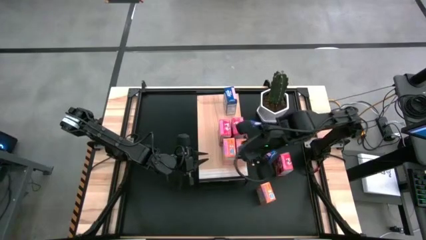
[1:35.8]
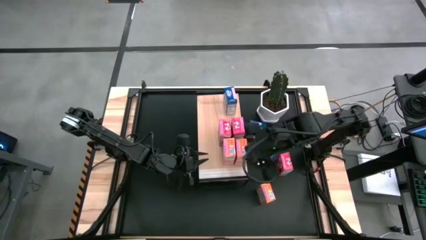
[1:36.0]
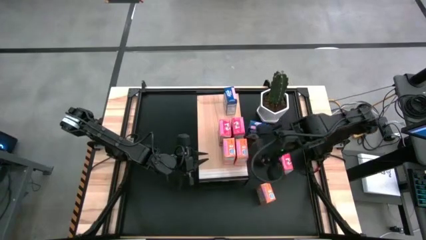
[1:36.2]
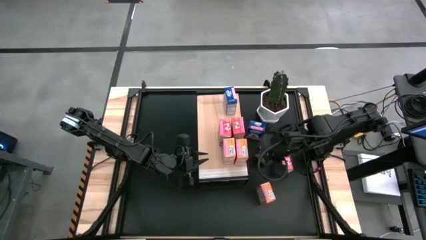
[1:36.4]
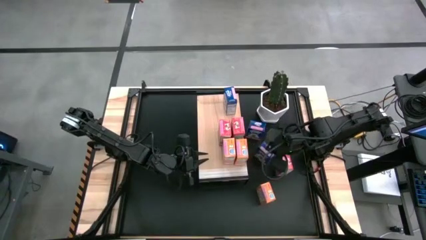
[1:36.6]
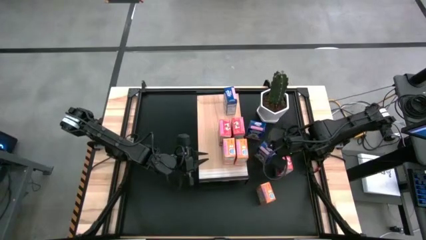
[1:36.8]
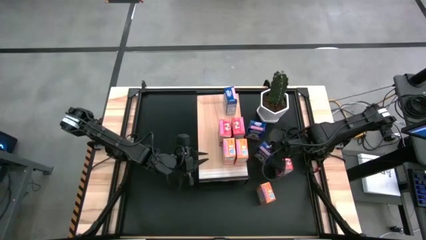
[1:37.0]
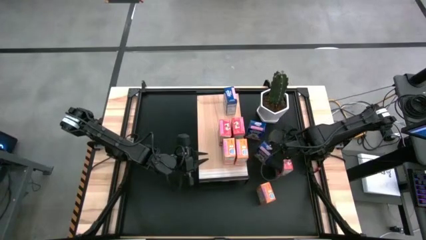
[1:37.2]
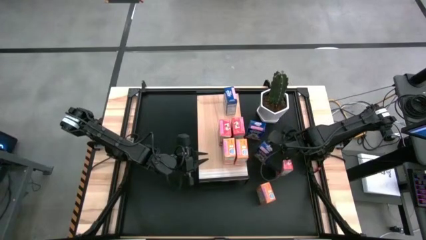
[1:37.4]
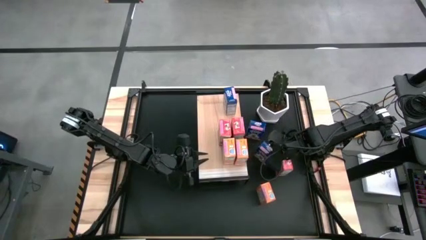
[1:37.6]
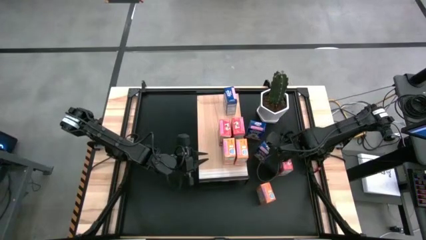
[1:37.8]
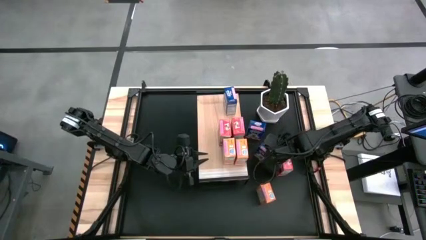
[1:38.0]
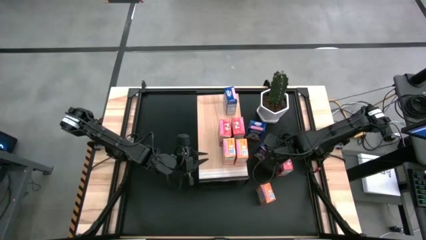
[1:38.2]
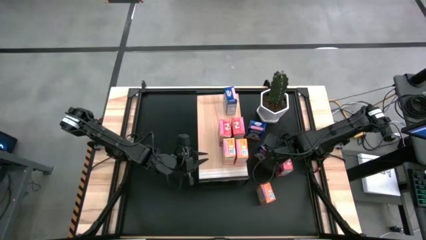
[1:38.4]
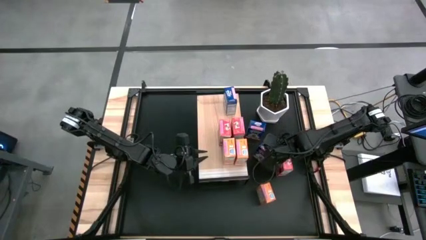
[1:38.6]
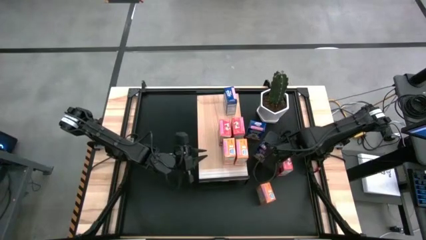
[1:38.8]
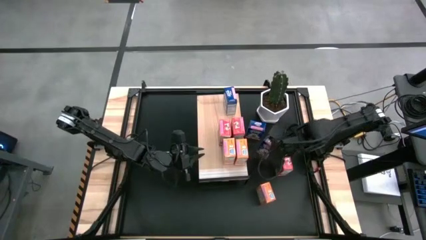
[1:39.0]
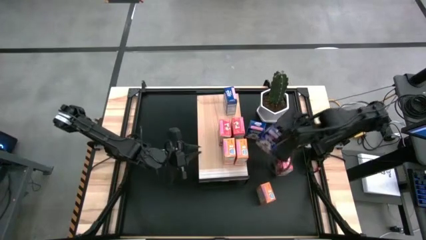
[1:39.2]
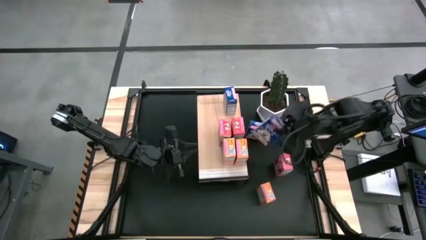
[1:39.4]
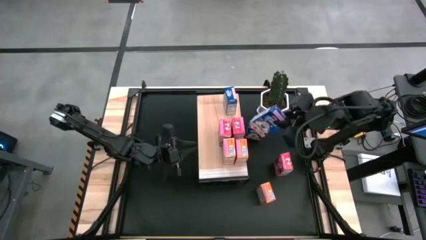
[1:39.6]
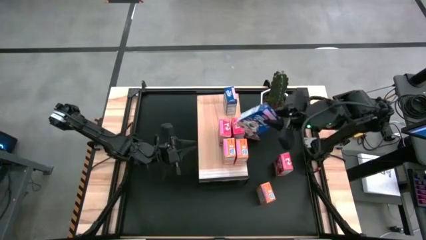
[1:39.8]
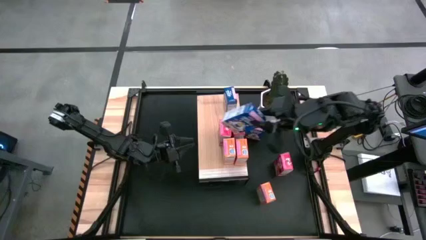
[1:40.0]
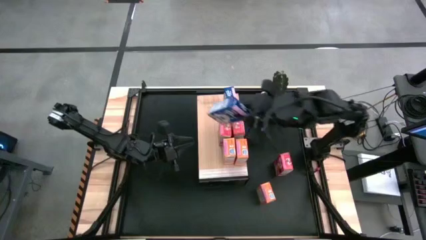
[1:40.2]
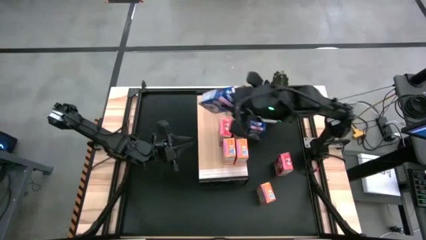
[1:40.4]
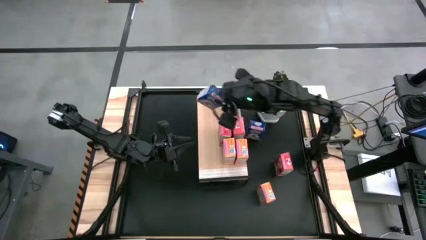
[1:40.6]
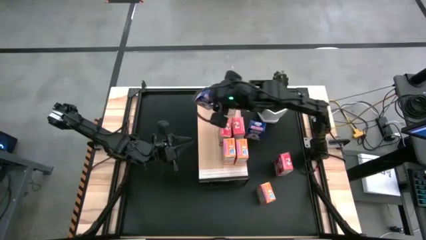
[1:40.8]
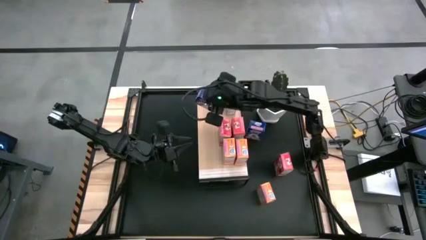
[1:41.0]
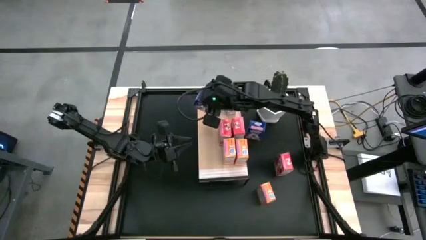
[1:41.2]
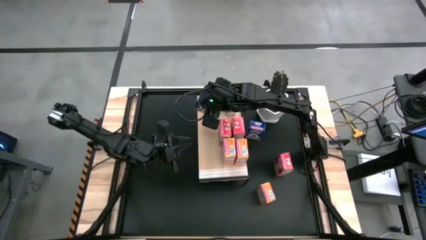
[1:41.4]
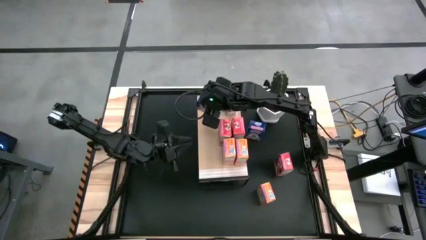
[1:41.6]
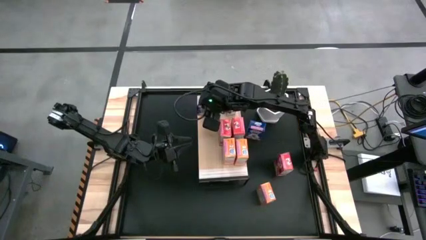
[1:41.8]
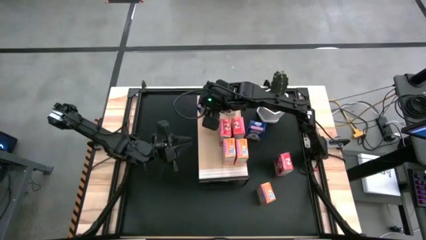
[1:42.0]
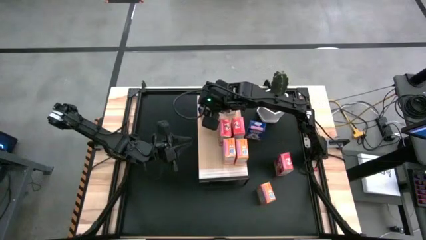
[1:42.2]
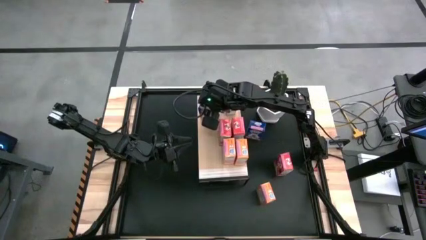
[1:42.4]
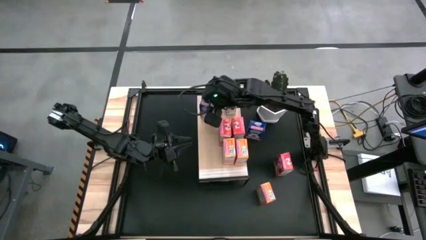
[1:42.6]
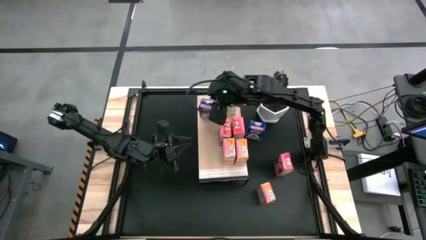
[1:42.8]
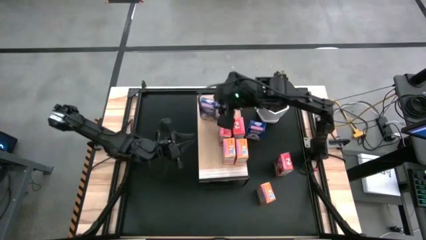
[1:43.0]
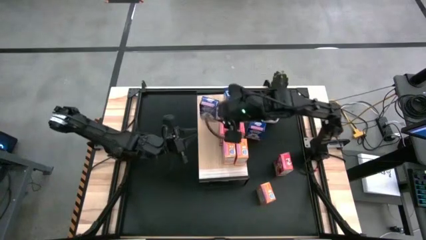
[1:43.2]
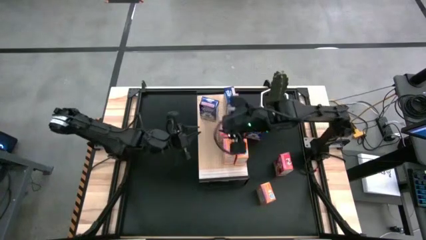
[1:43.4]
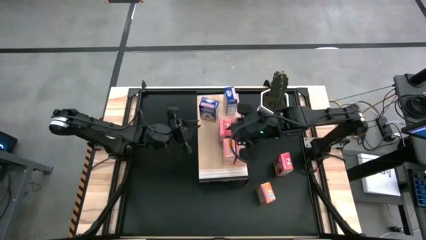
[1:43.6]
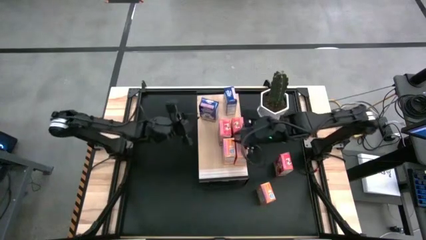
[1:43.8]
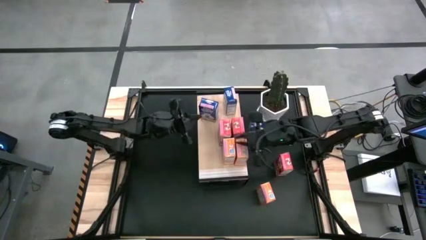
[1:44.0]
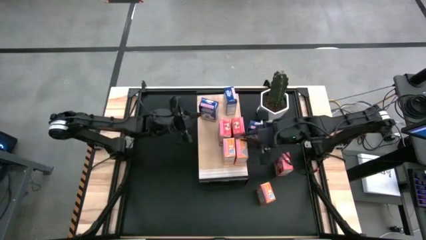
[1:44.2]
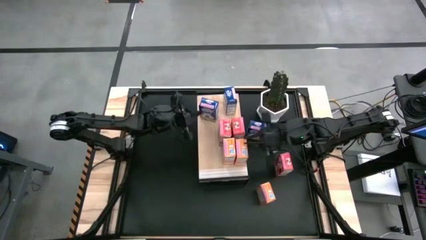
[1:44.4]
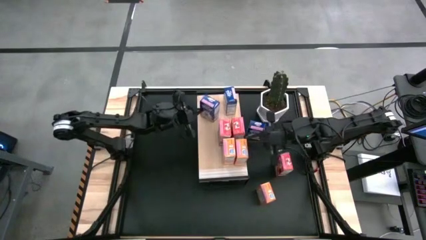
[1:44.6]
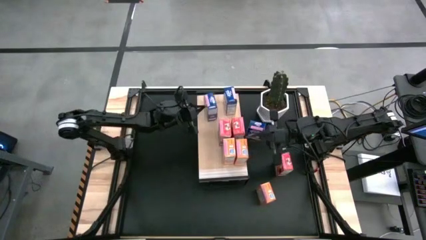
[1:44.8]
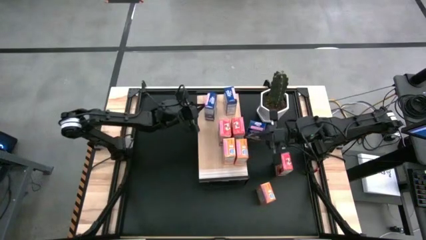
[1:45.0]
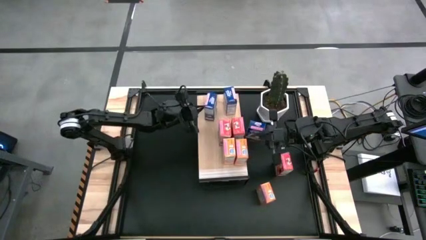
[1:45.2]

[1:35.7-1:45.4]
Task: Stack cereal on shelf
Put the bottom blue cereal box aligned with the other blue cereal box on the shelf

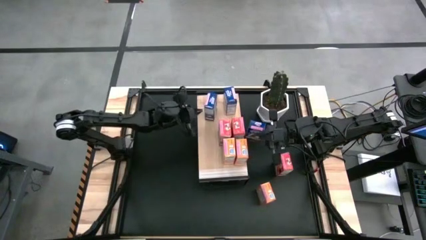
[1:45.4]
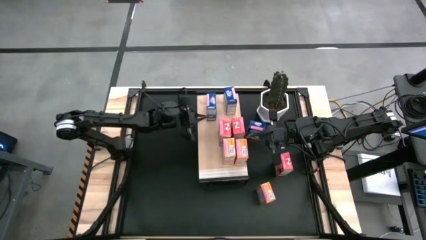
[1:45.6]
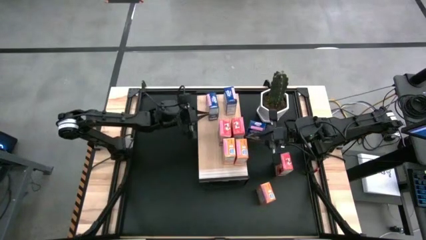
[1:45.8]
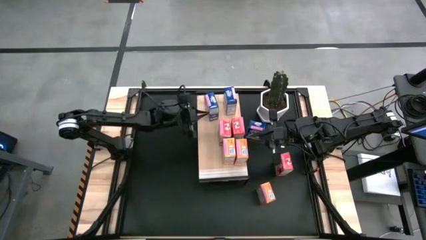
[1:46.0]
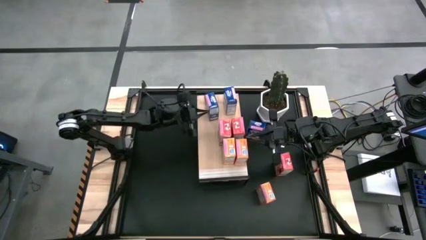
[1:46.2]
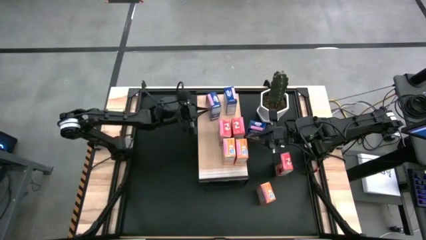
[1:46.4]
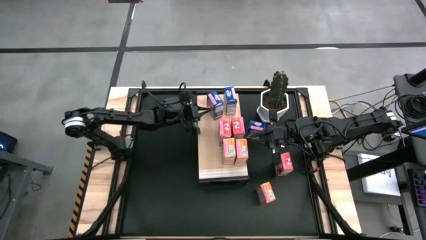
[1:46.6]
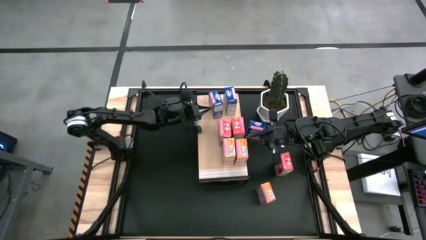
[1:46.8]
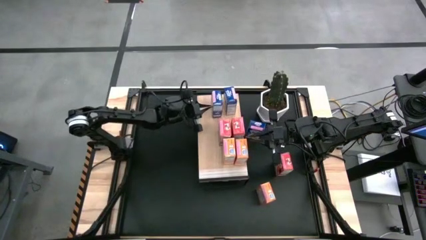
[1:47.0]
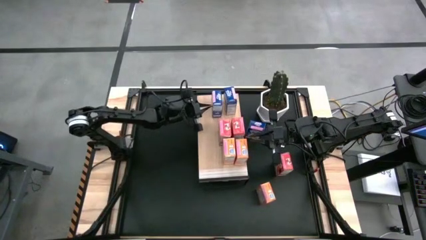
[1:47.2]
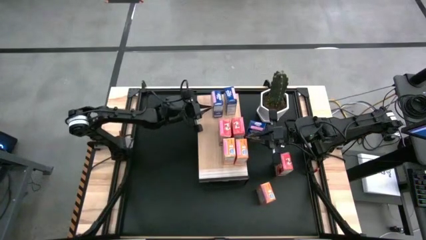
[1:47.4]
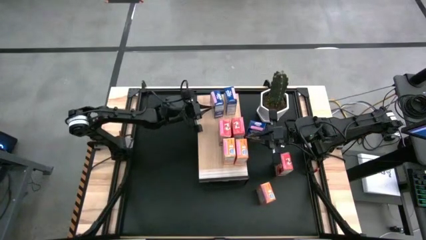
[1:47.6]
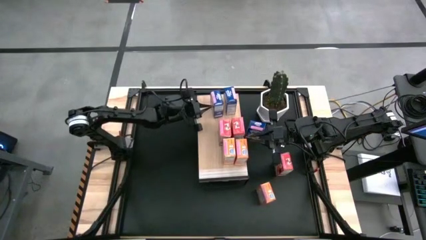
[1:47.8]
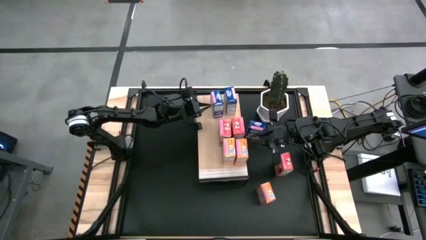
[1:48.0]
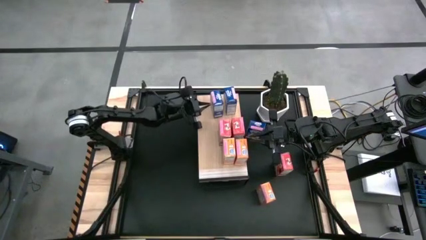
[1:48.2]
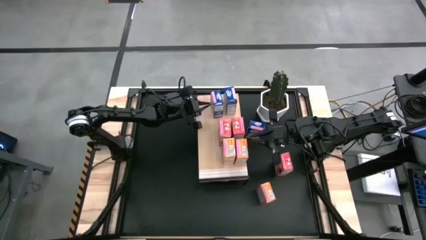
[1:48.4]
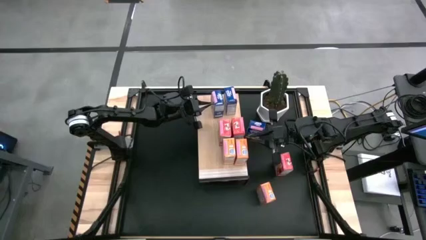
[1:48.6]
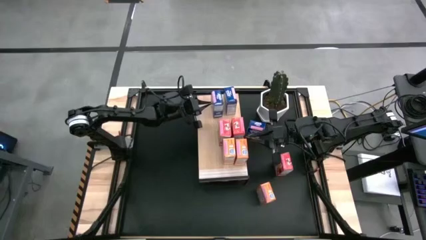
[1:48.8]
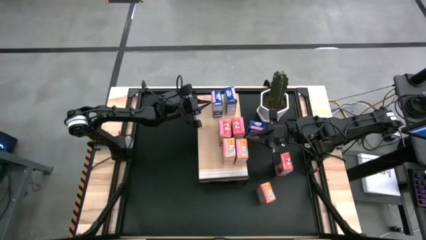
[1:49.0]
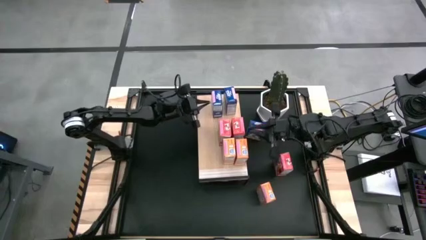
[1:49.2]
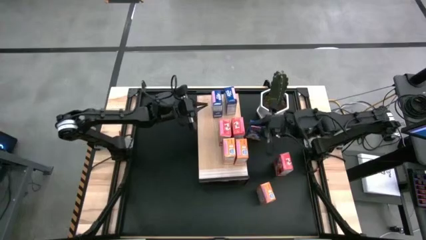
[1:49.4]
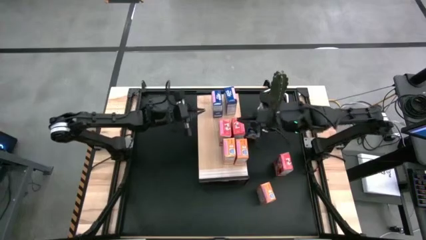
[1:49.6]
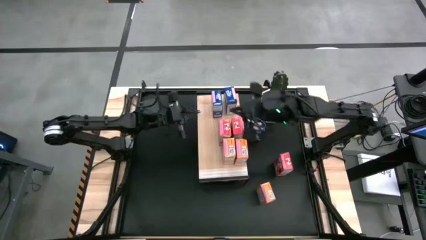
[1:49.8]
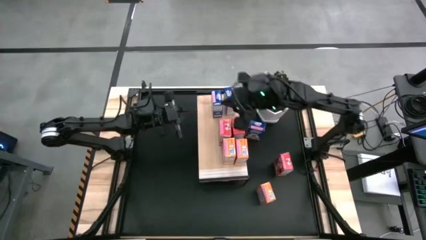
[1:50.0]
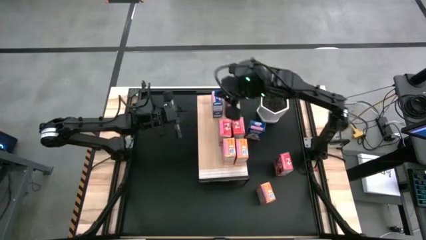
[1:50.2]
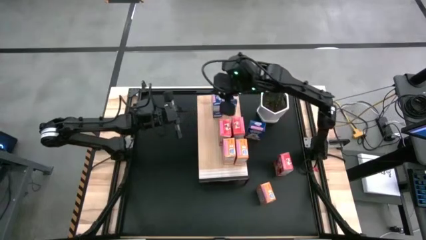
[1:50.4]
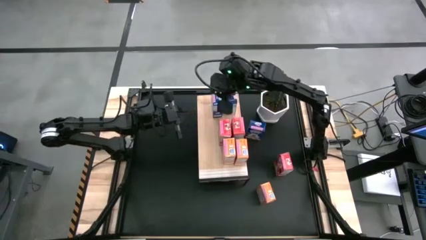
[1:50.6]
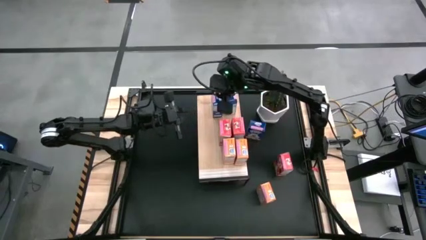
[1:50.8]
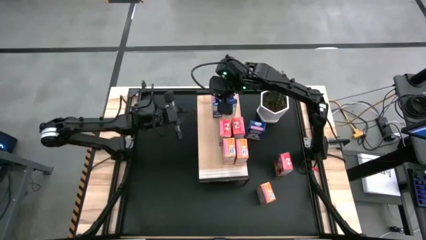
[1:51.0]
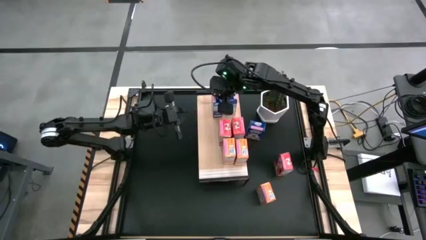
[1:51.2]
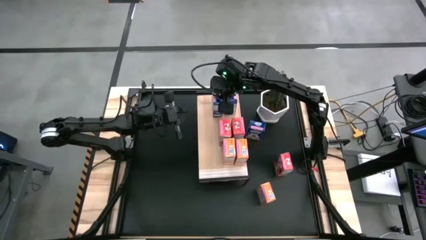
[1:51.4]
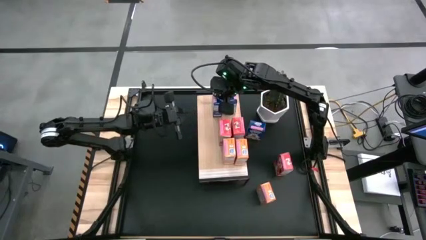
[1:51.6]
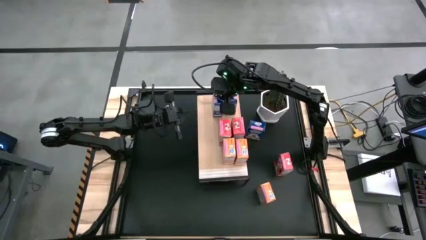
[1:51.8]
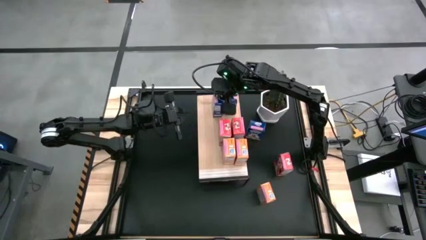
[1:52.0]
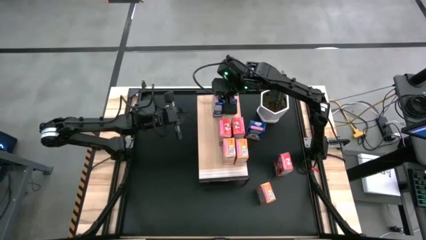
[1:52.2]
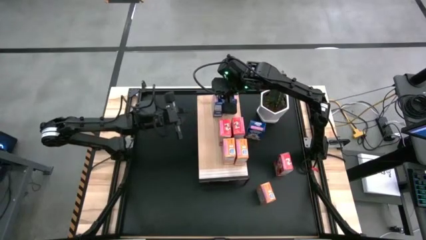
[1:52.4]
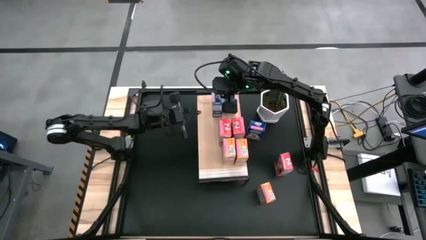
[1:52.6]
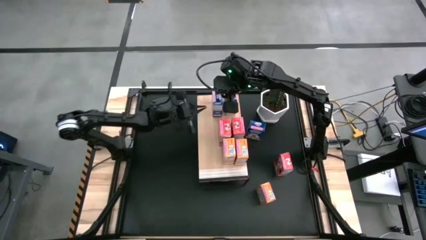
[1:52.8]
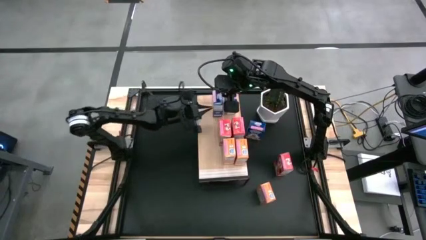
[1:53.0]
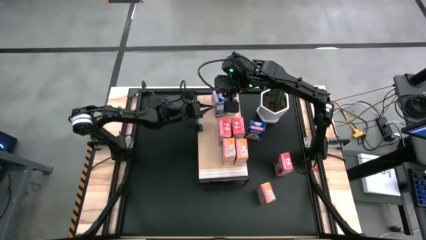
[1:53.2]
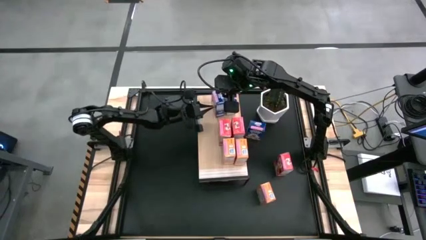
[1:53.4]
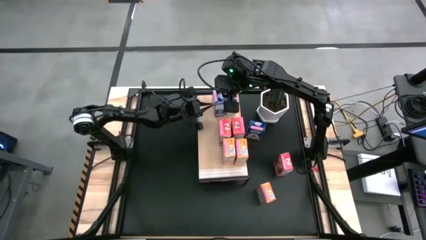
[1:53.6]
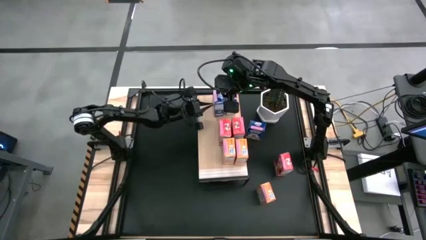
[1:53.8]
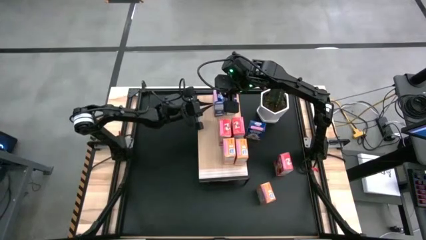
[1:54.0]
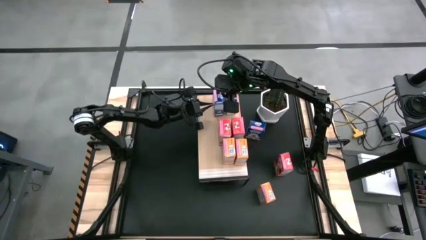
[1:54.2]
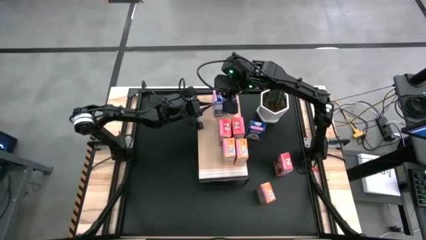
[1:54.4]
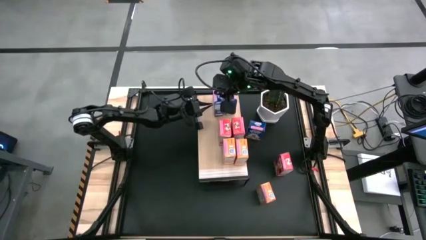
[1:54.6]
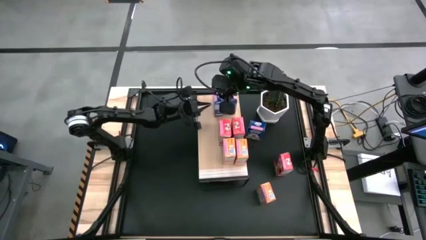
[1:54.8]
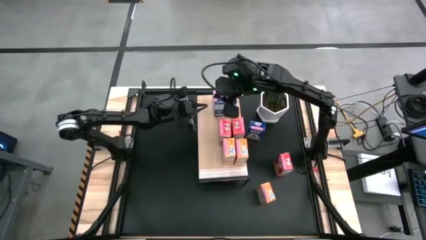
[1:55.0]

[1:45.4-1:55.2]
Put the bottom blue cereal box aligned with the other blue cereal box on the shelf
